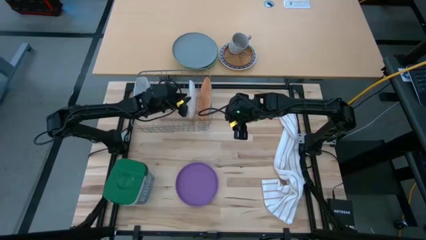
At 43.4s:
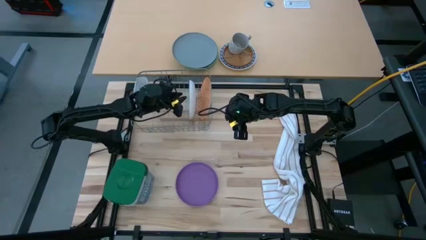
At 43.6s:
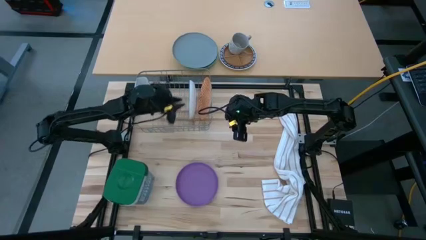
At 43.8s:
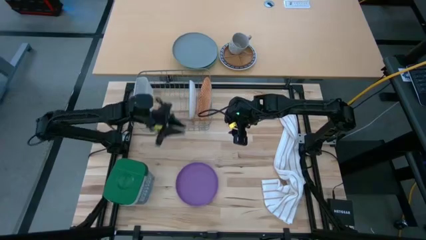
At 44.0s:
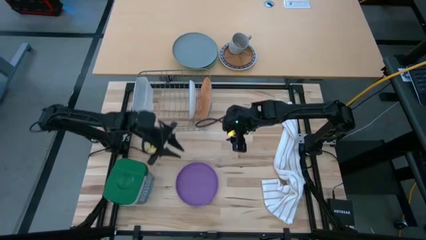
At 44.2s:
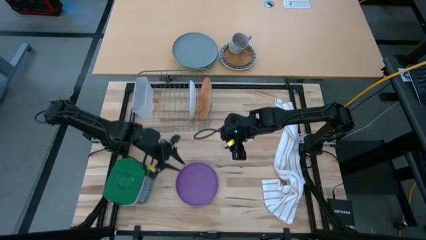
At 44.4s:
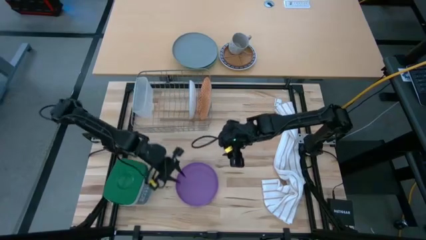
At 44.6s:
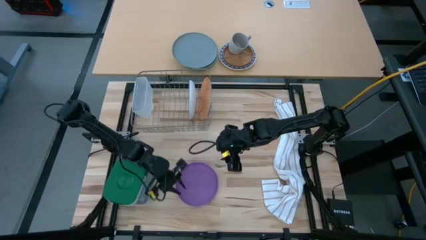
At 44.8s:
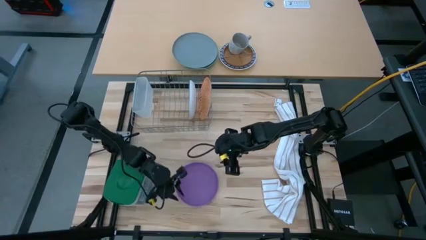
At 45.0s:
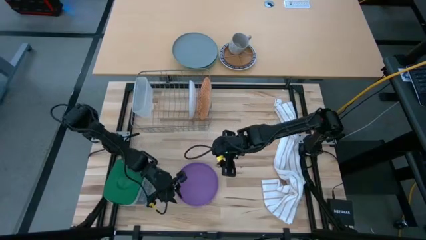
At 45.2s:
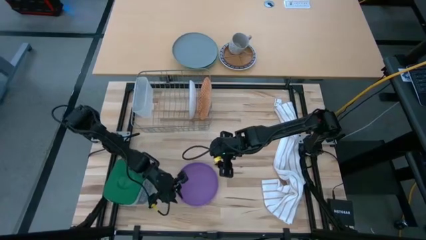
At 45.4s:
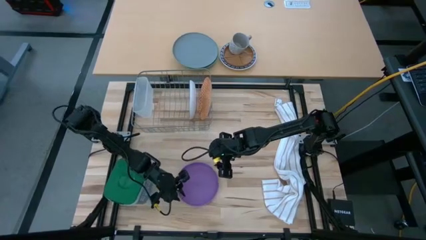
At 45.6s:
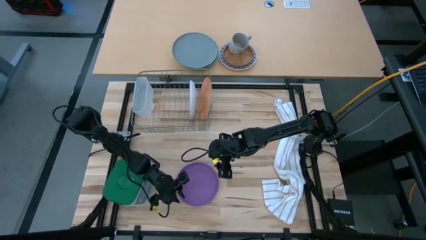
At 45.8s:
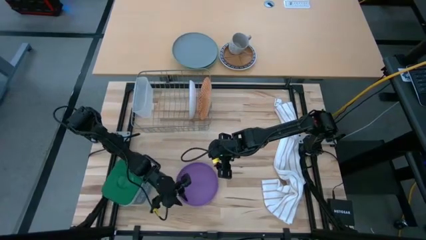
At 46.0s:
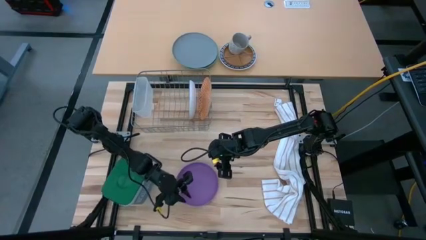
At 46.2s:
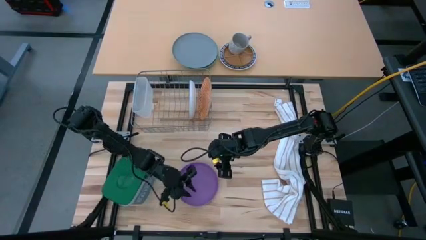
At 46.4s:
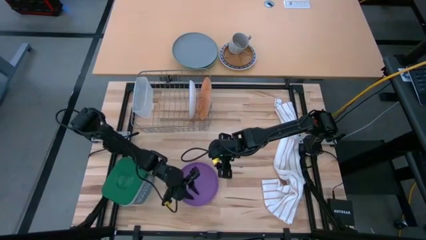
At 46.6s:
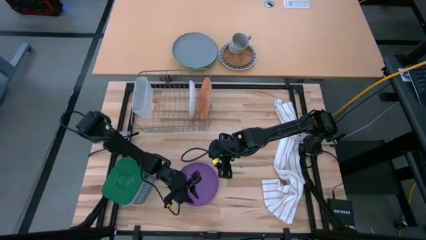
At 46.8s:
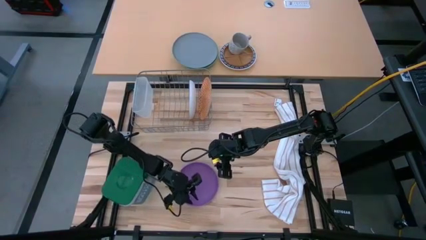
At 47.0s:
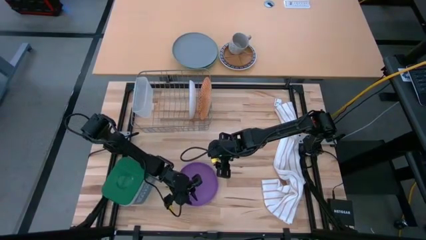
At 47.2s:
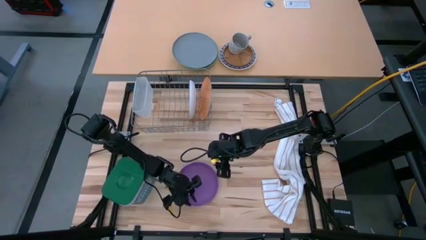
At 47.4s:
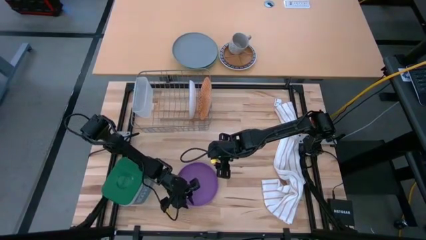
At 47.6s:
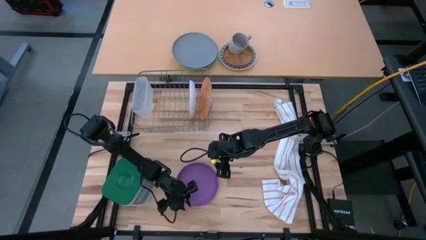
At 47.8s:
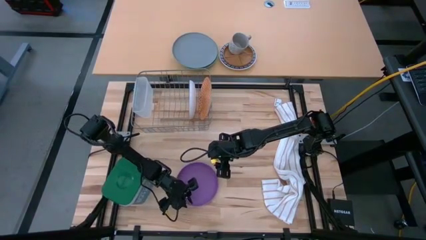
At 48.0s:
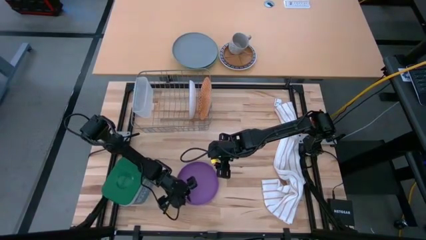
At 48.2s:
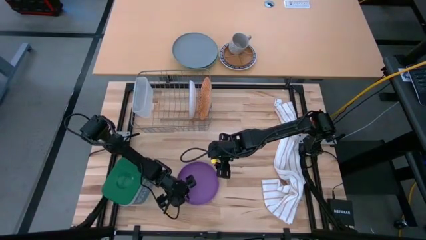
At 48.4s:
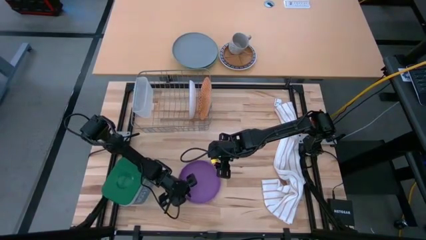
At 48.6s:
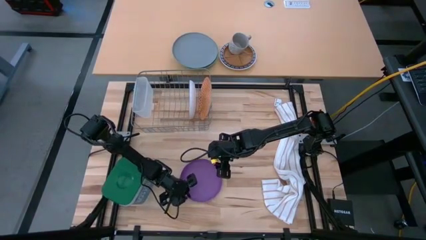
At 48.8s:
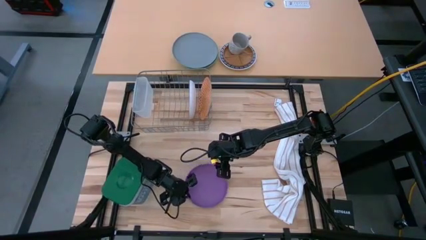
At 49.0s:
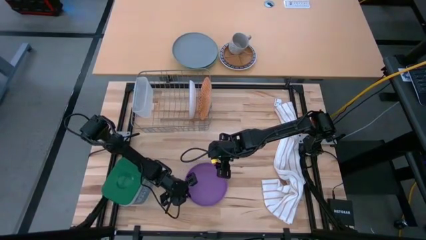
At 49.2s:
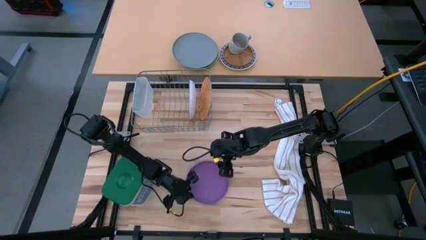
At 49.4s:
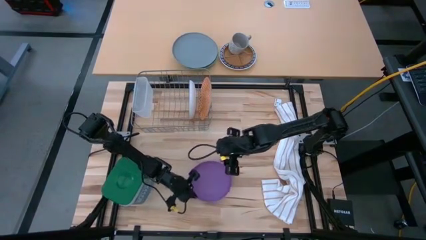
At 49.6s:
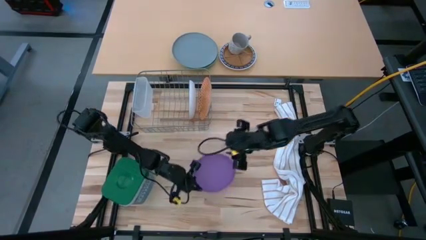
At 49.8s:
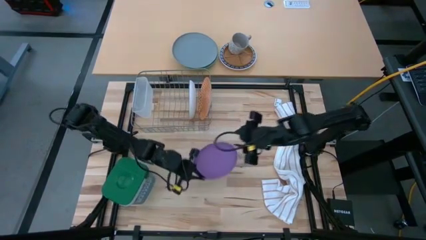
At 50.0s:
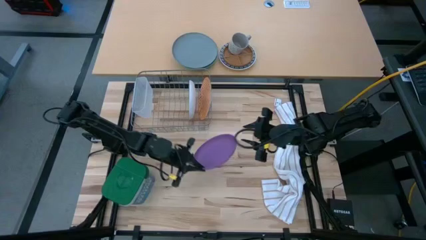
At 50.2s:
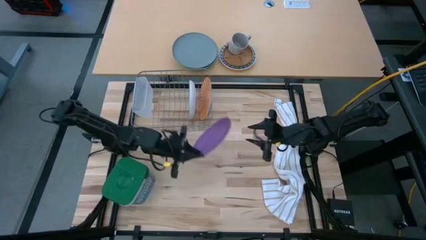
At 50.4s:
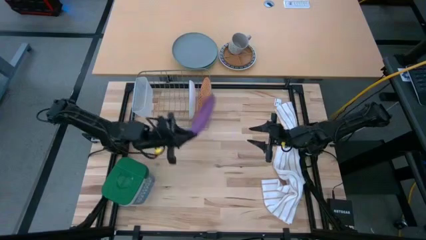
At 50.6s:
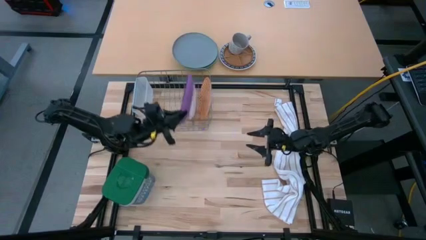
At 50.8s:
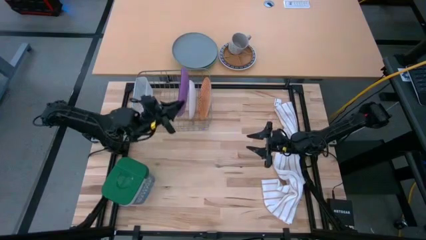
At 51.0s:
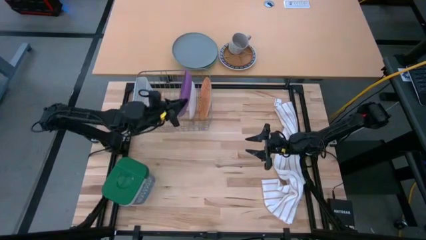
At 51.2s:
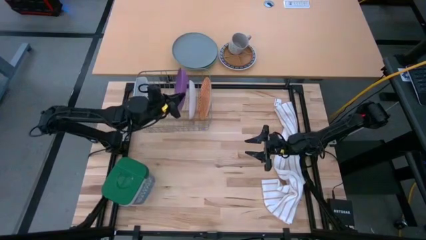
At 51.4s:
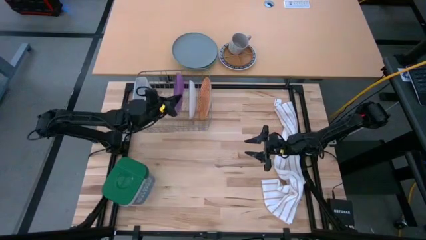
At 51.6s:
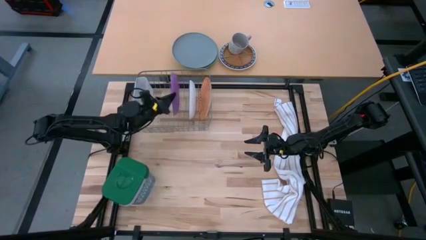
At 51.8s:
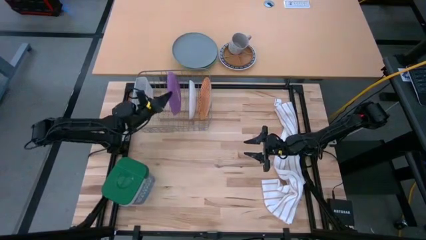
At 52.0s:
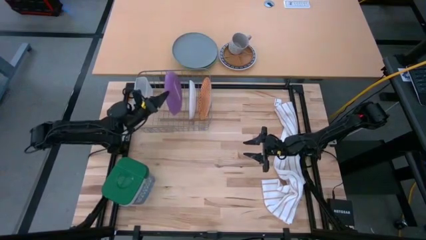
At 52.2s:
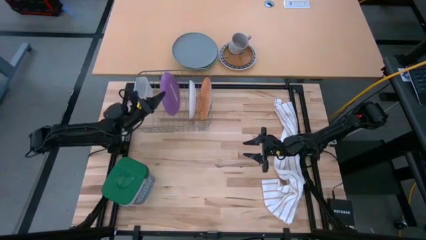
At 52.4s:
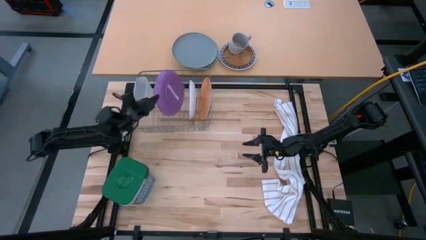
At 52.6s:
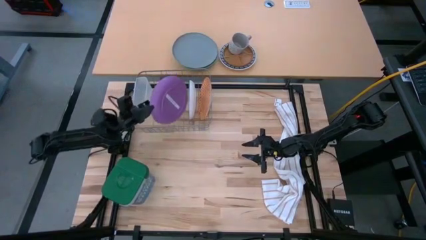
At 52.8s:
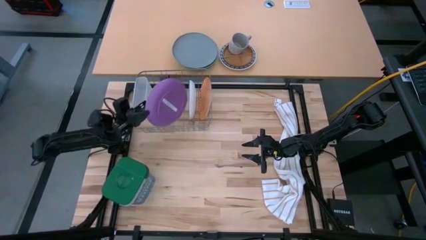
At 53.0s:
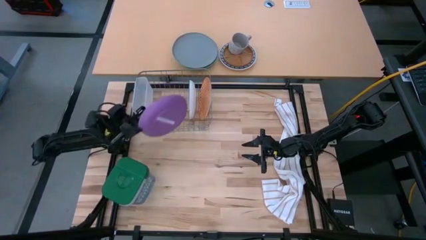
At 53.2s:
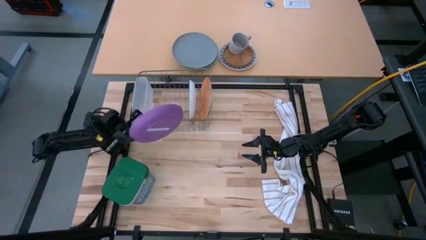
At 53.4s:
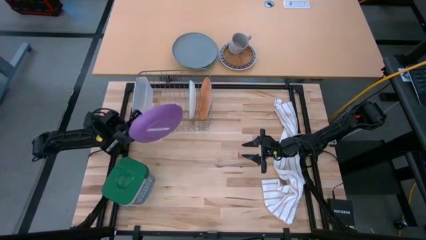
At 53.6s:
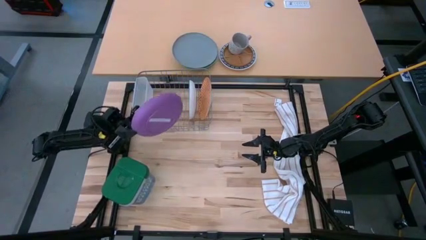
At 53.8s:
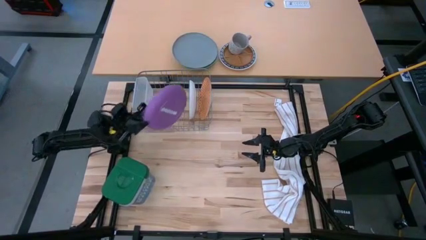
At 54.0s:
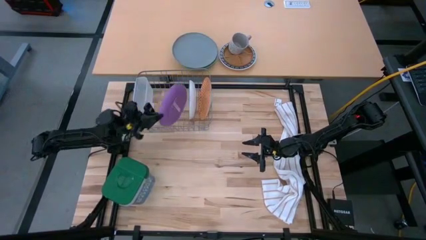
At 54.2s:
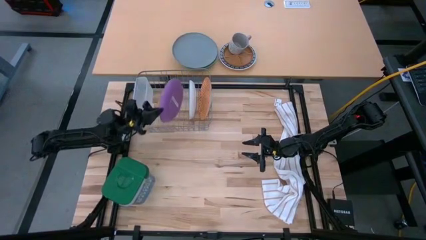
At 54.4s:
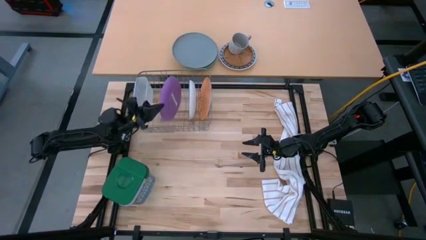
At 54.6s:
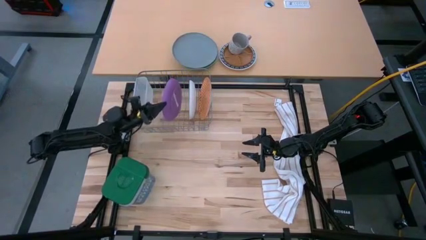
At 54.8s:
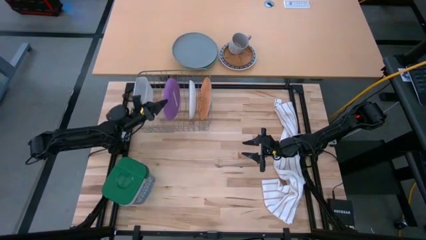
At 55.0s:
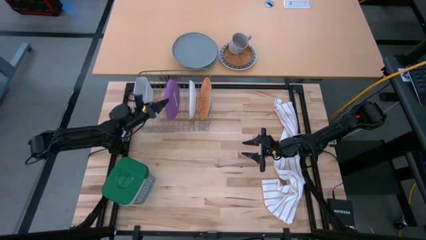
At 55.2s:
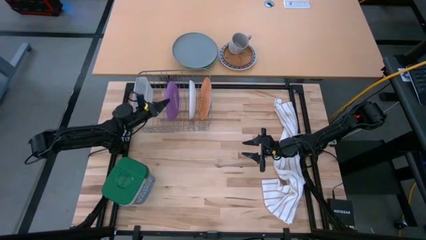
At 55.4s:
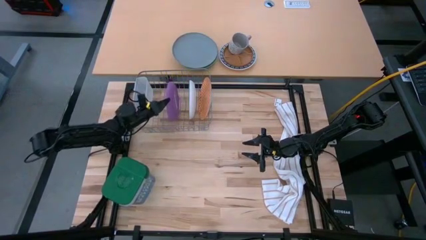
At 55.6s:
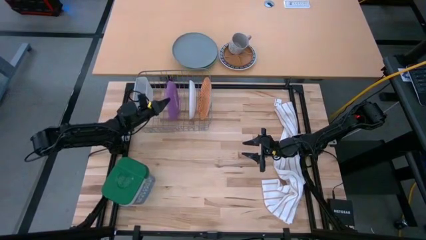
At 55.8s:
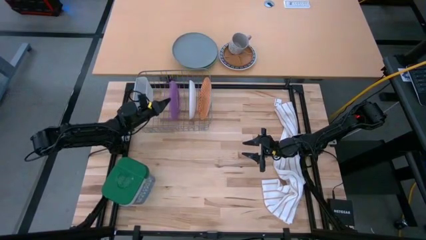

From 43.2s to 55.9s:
Task: Sort dishes
Put the purple plate into the dish rack
